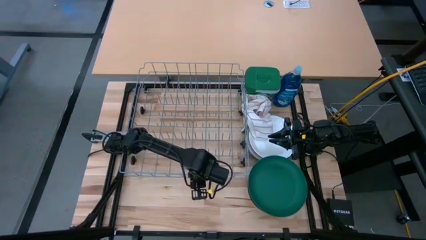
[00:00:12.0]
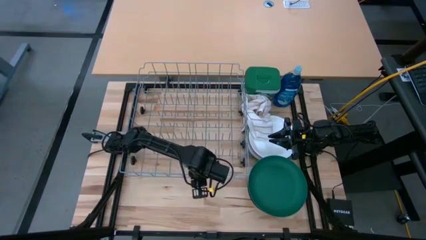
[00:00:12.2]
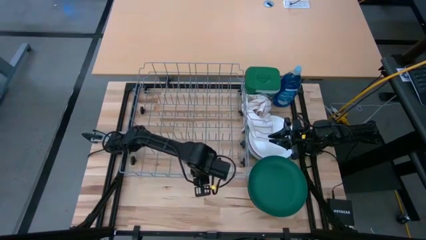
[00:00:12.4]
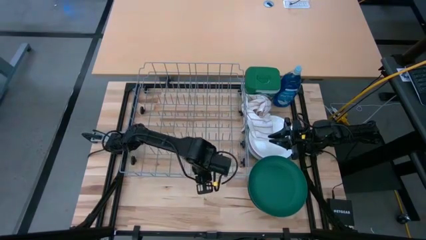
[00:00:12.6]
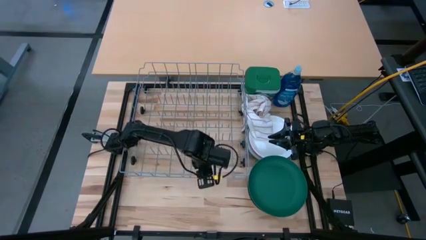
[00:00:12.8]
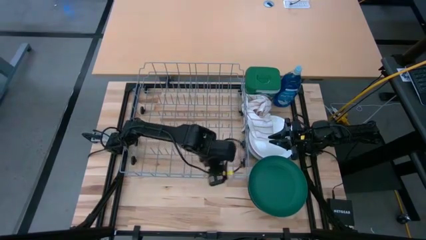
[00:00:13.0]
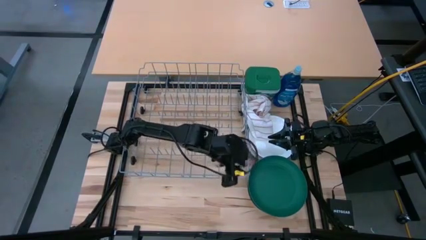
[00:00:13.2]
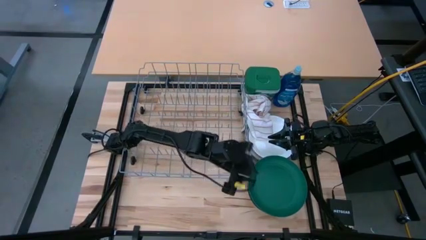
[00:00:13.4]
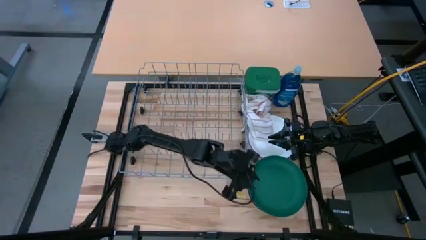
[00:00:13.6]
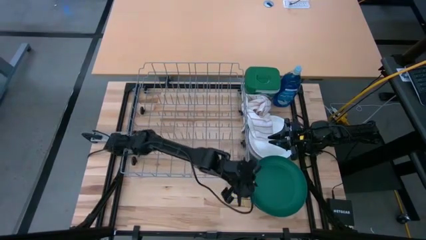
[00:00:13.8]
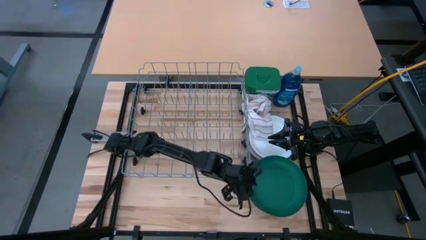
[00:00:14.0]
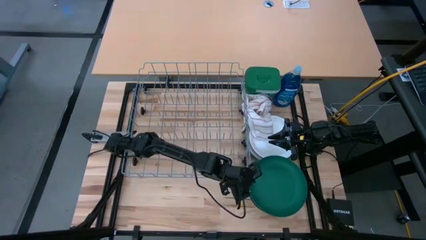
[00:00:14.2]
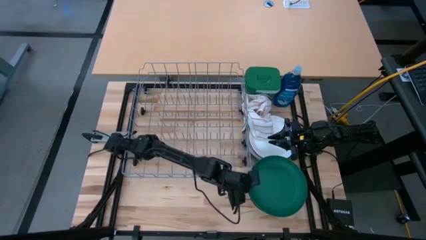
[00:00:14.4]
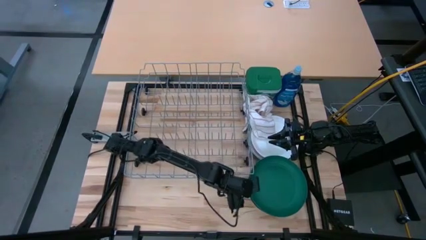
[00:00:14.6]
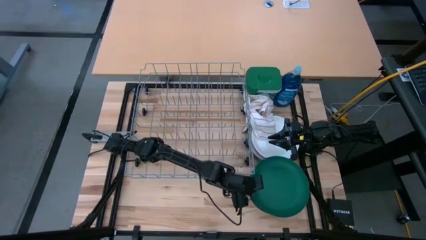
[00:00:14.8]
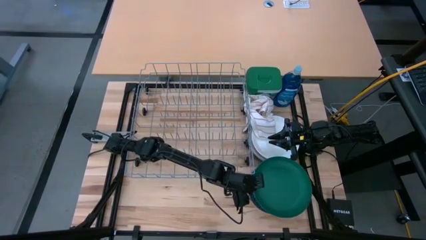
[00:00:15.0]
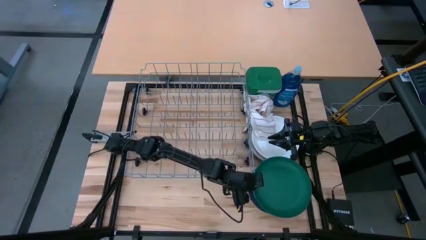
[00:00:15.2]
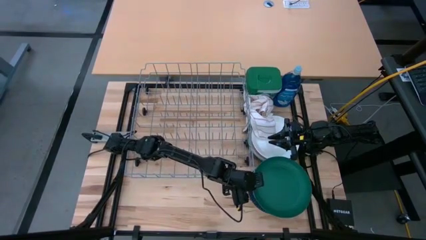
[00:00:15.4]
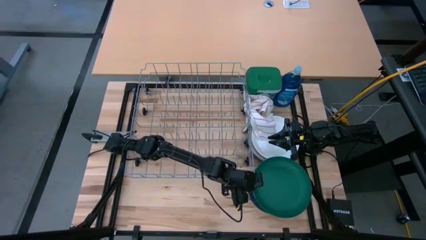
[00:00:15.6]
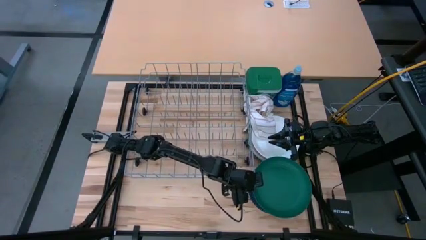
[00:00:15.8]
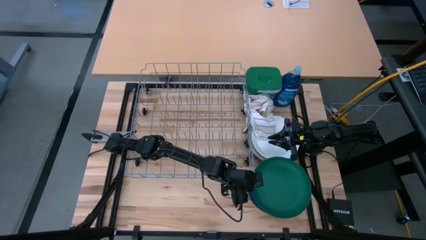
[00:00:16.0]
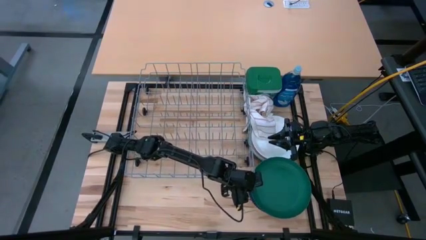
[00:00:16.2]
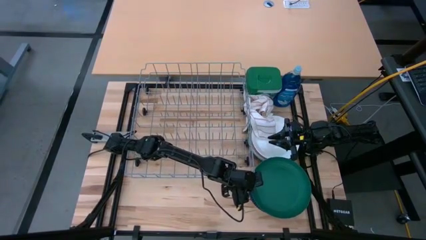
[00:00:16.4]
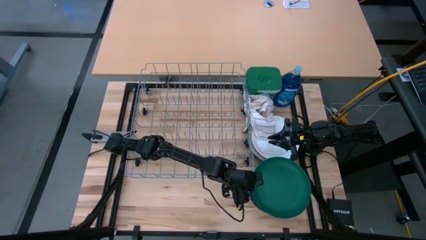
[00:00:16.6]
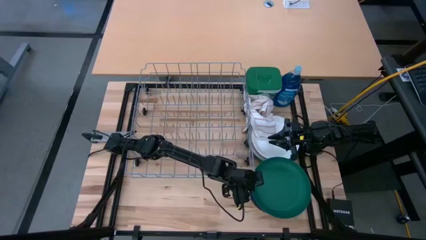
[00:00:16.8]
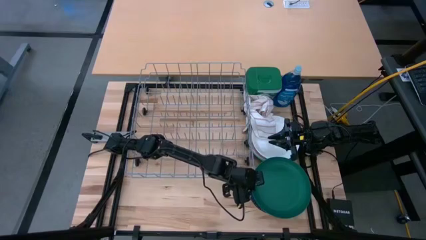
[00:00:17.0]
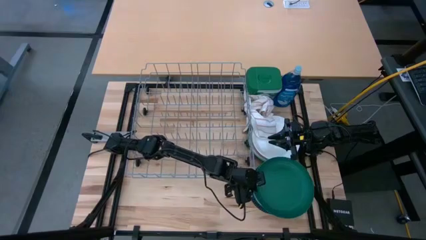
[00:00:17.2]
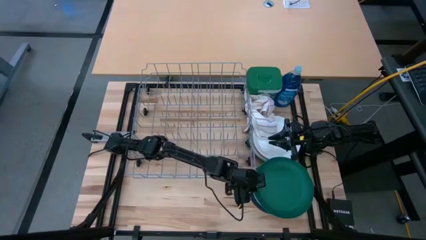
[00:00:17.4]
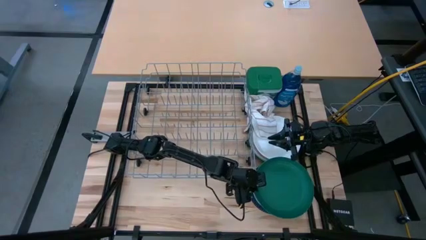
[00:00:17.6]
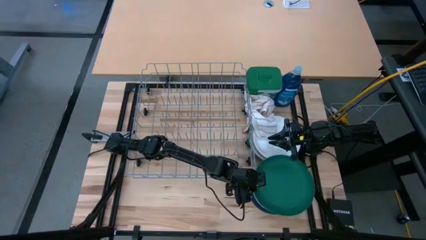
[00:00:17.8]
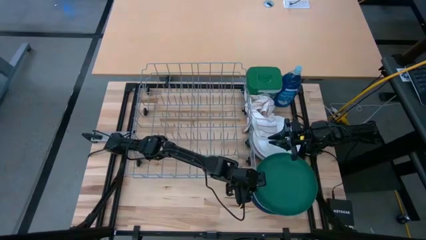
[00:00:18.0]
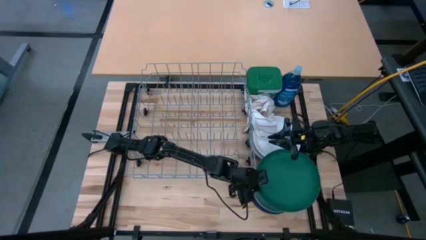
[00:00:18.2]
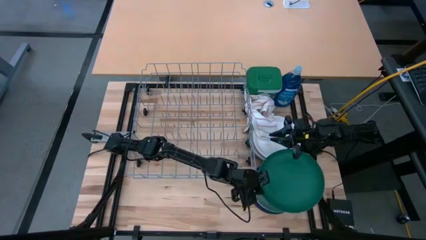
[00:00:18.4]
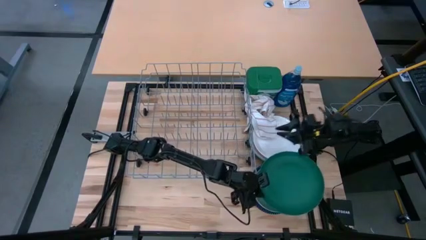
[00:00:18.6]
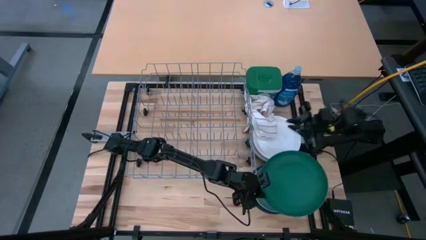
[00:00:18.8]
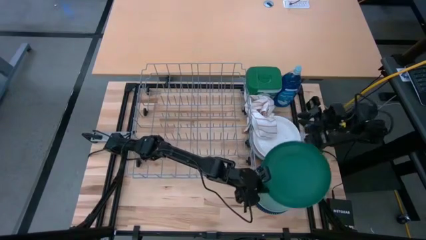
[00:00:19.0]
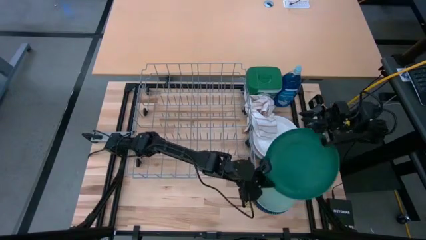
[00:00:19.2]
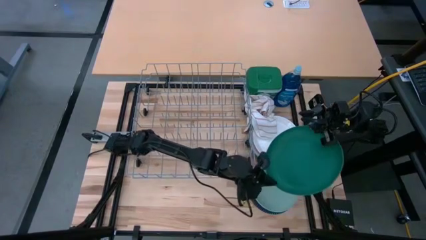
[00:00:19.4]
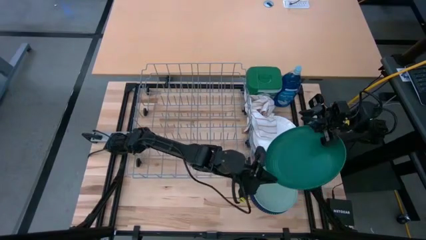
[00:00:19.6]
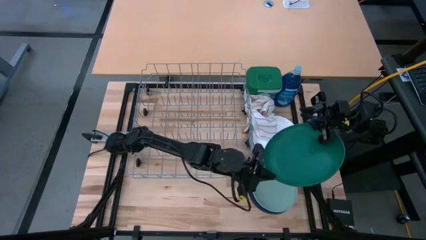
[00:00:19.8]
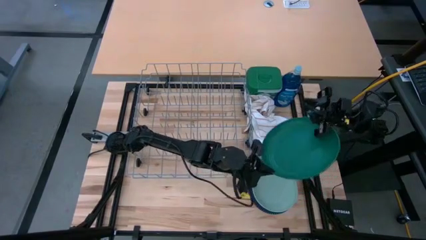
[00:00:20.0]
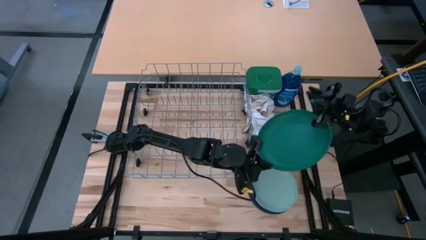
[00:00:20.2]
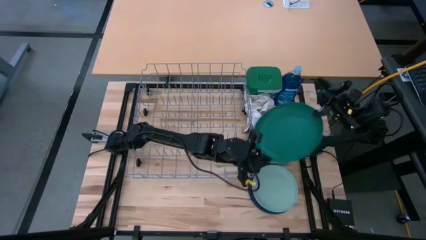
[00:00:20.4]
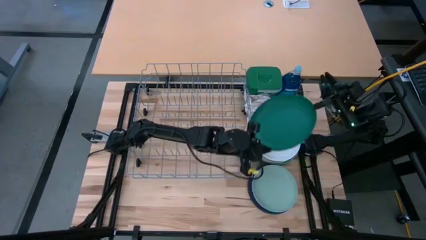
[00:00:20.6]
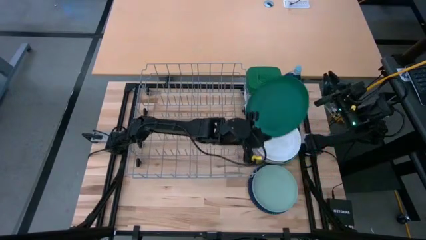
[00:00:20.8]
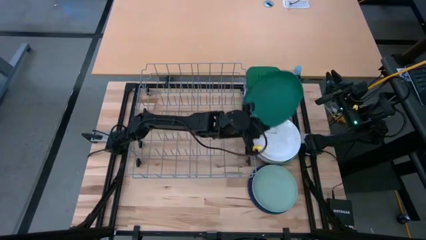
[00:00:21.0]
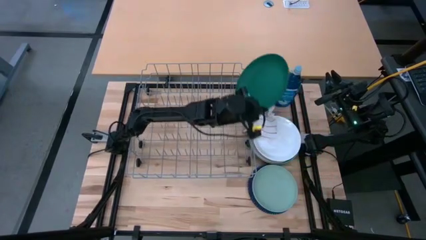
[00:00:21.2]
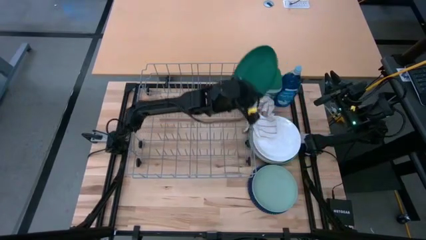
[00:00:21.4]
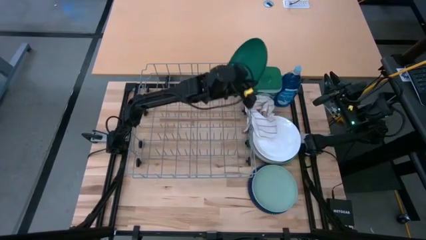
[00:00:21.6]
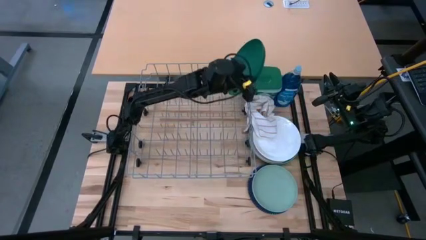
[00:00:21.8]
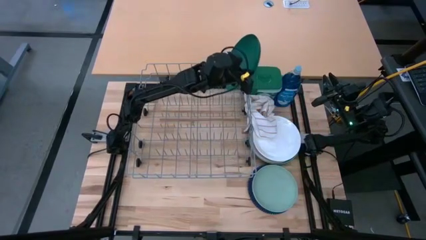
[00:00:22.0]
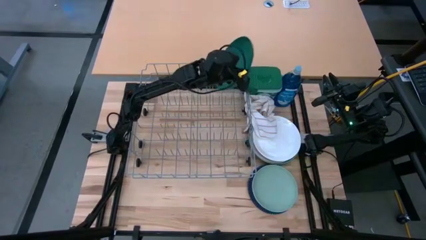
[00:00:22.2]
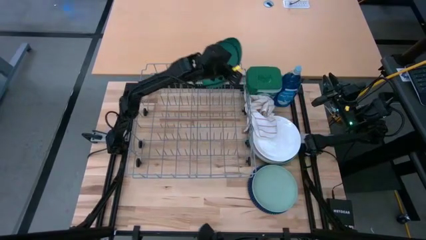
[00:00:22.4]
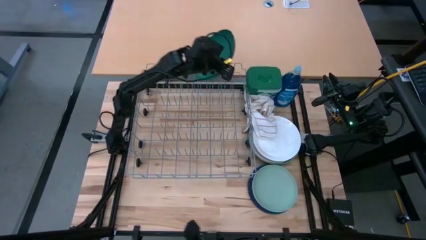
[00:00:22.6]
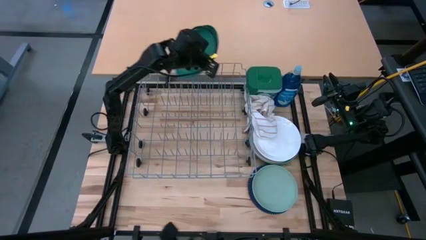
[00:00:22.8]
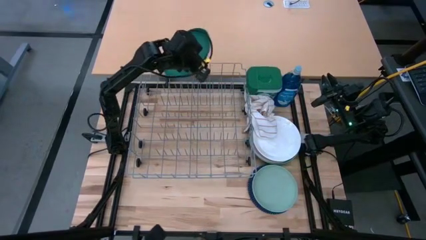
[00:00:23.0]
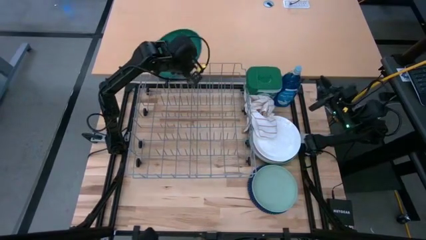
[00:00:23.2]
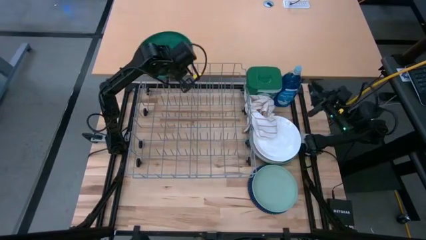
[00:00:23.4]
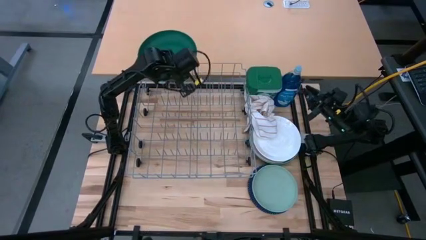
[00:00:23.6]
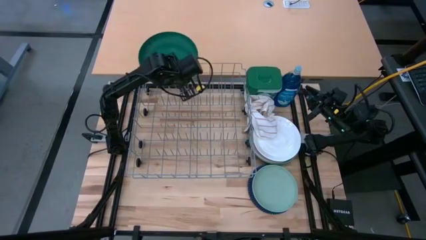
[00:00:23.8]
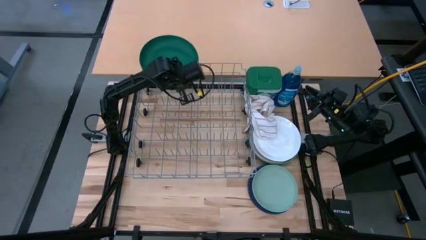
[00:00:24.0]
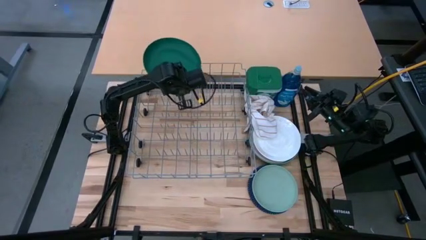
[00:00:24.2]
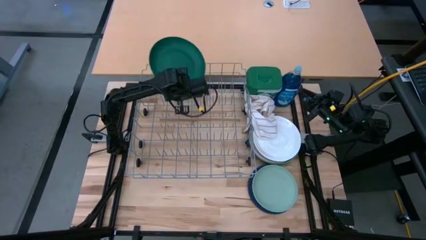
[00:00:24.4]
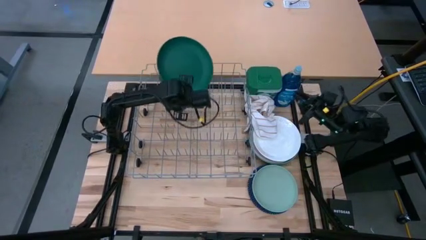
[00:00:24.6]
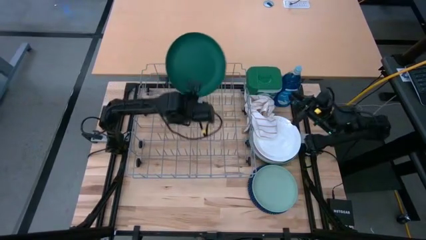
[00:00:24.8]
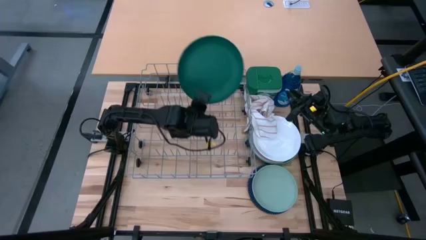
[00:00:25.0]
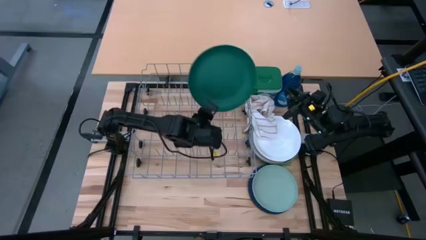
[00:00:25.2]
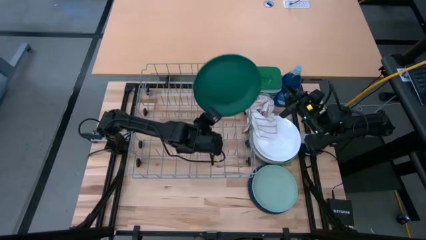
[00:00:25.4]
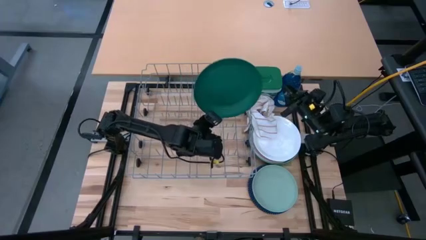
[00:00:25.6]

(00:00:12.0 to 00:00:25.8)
Task: Sort dishes
Put the green plate in the dish rack
